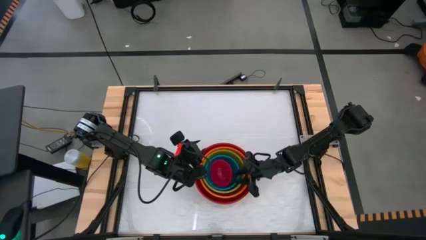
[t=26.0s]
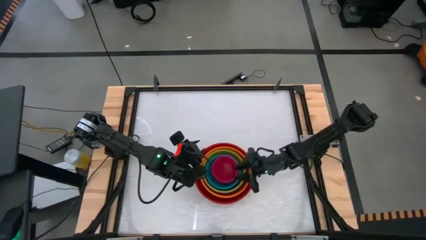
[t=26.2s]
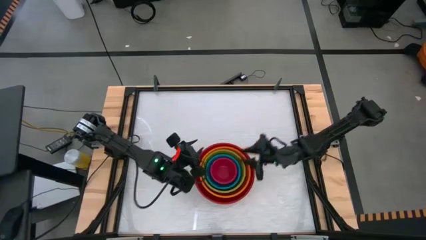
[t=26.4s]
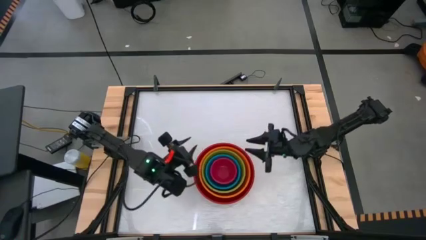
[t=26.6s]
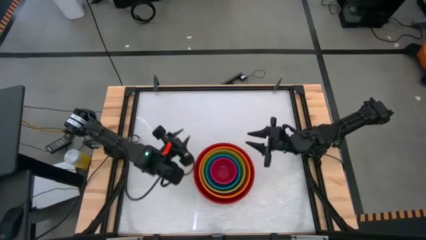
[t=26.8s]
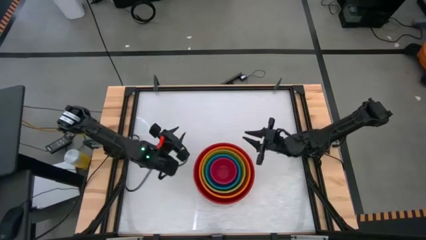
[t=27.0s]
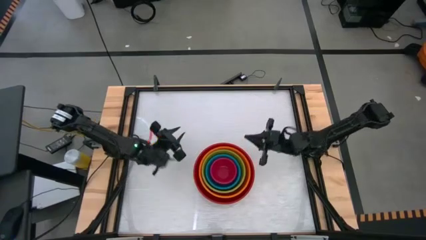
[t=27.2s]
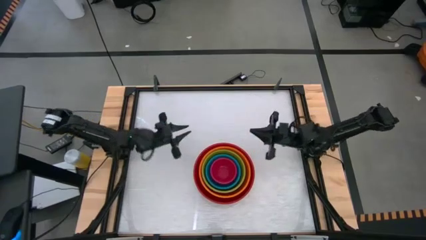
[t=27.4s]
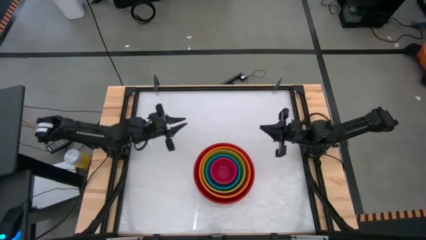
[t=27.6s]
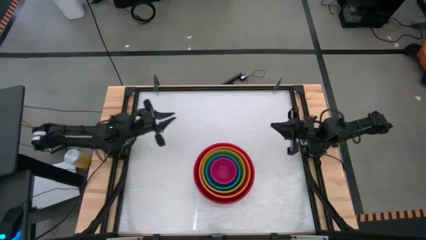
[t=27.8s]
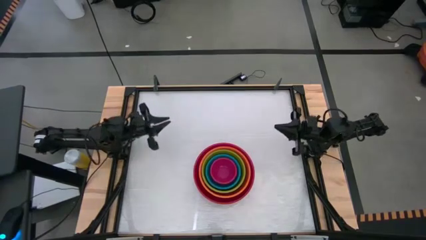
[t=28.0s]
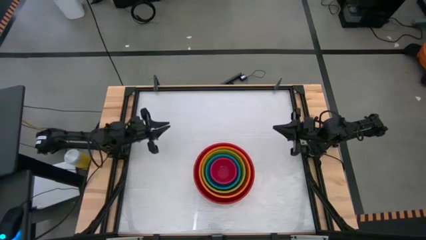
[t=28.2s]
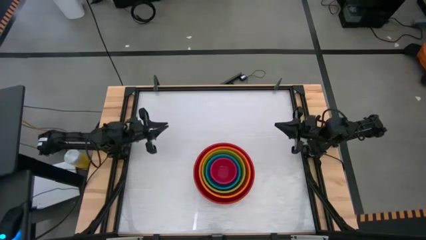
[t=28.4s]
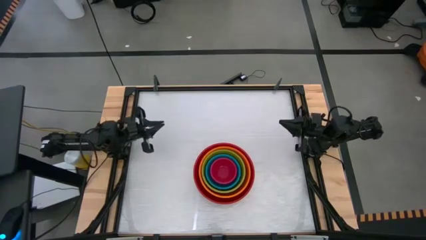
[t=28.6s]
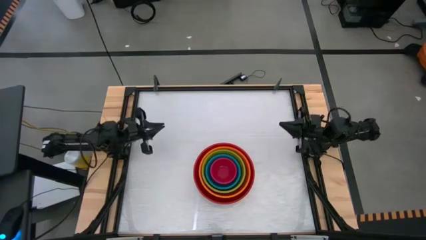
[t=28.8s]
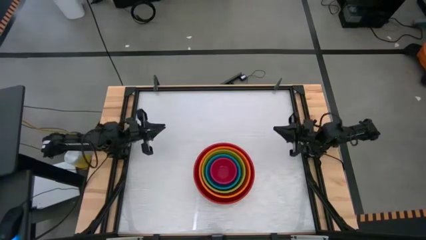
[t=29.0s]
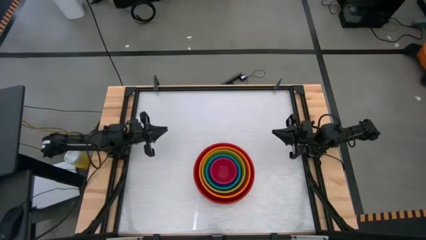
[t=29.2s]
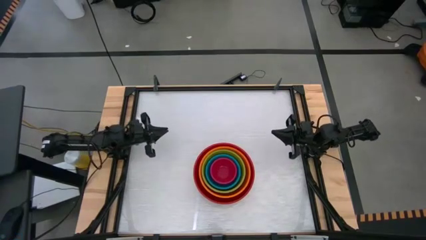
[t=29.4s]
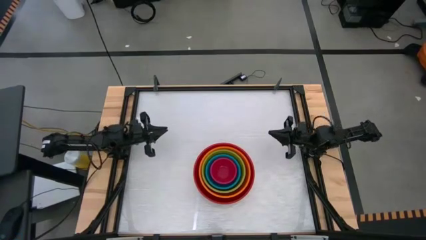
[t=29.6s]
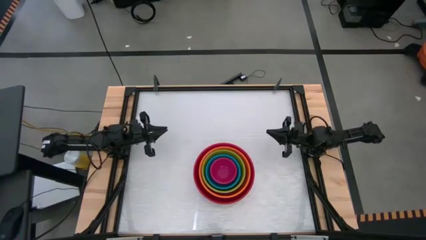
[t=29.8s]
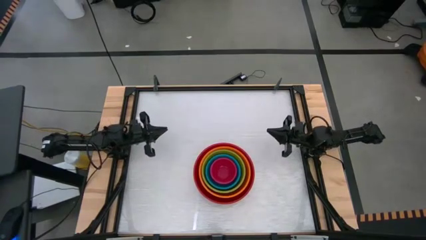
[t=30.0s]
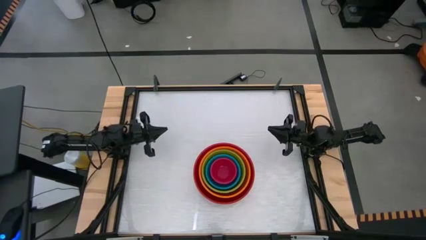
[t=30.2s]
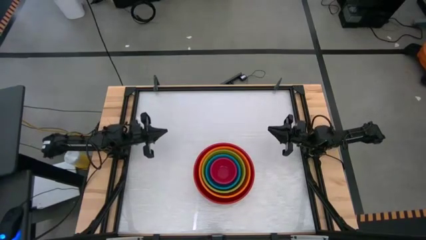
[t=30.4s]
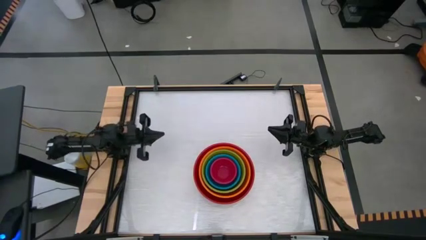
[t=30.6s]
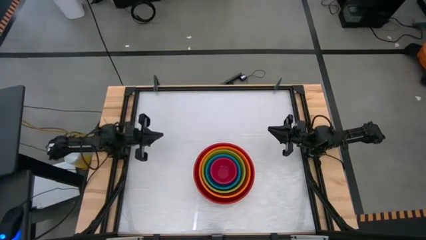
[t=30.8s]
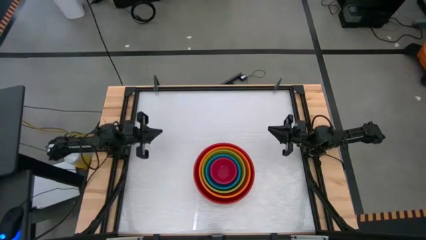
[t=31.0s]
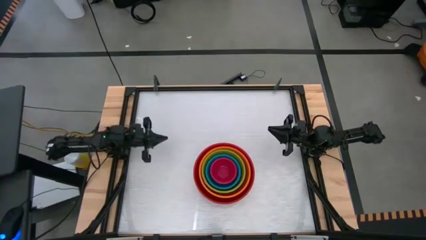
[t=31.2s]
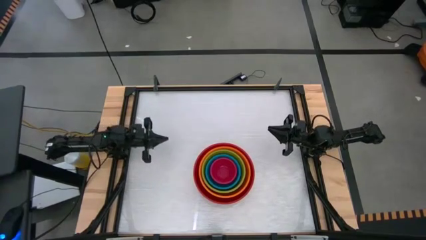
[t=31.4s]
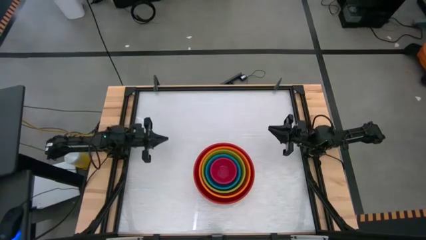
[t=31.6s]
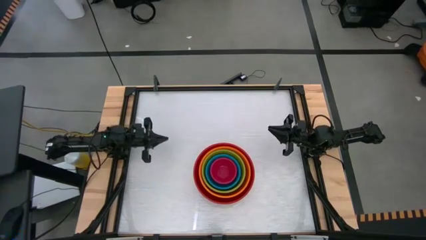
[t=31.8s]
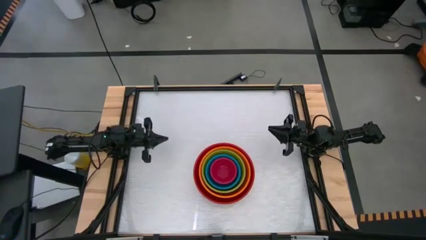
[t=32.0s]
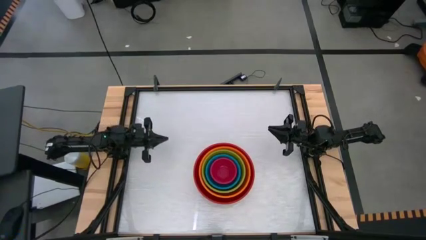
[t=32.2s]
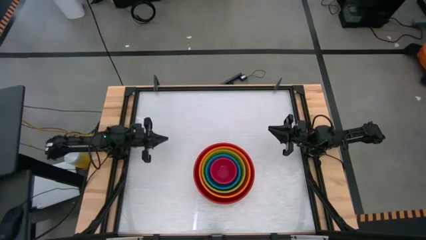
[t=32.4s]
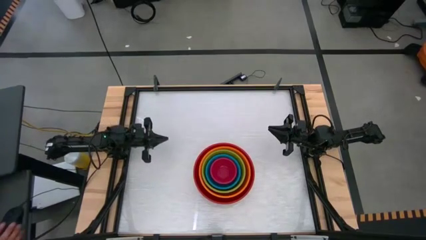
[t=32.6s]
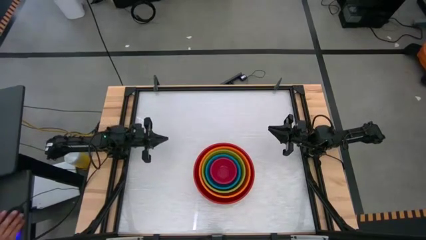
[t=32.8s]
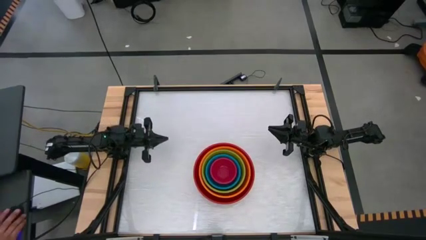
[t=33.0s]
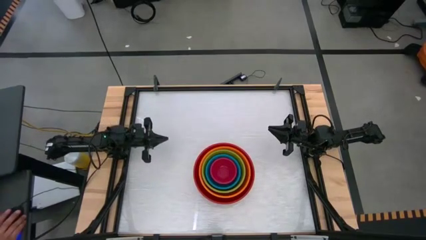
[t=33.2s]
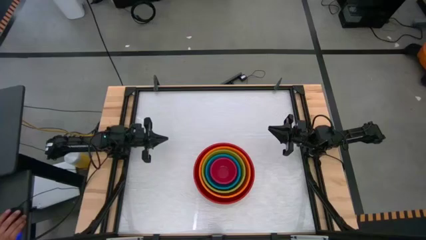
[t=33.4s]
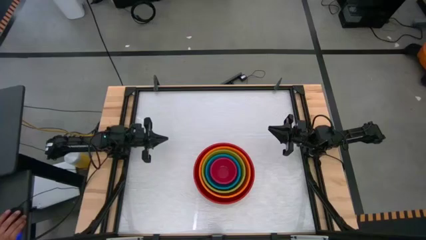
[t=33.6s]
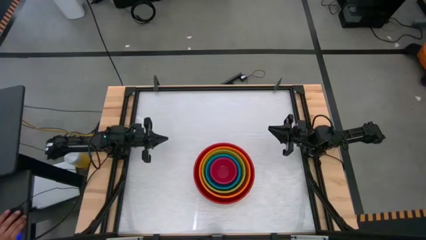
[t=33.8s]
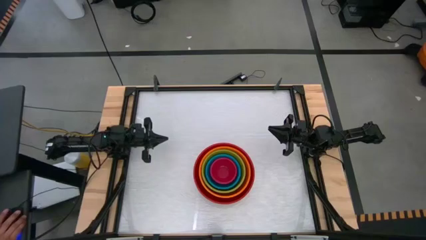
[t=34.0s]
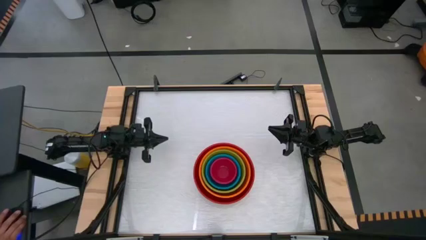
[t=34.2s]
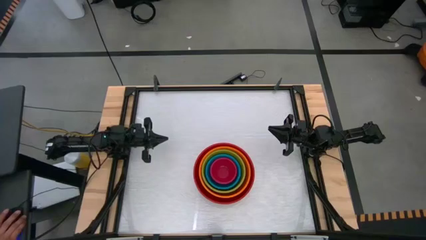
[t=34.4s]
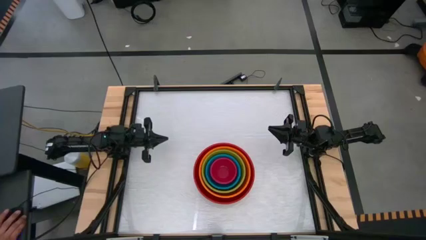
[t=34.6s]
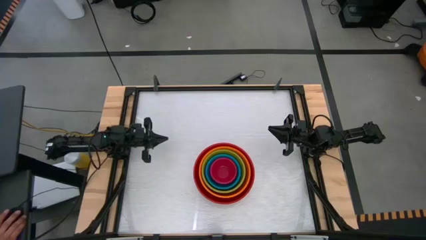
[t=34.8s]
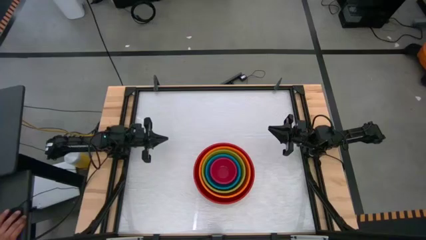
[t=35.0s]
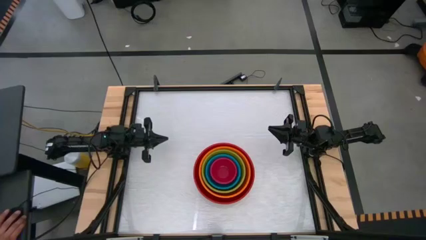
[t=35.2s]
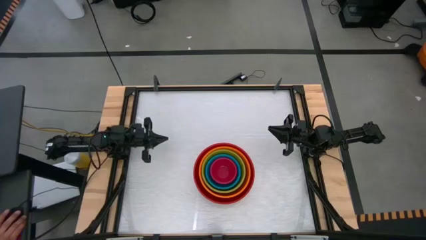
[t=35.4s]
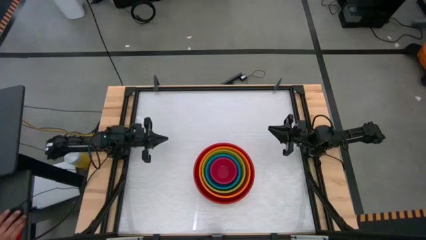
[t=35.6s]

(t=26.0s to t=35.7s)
Return to Home Position

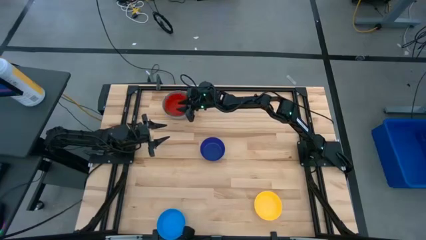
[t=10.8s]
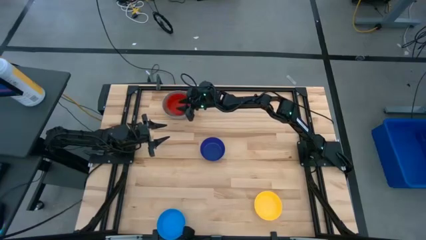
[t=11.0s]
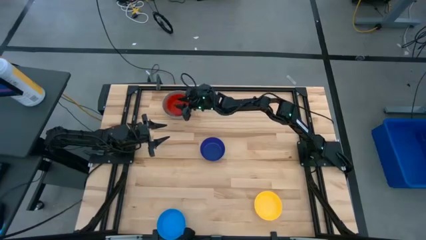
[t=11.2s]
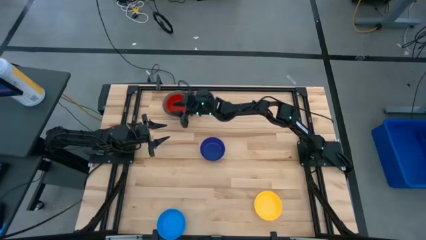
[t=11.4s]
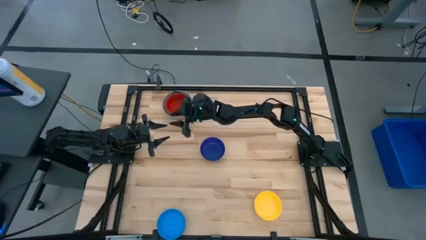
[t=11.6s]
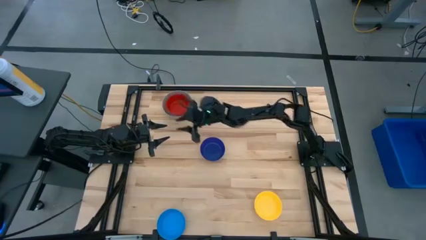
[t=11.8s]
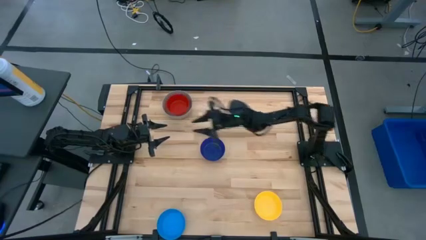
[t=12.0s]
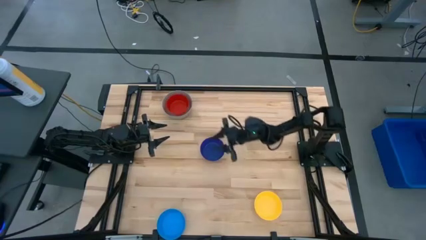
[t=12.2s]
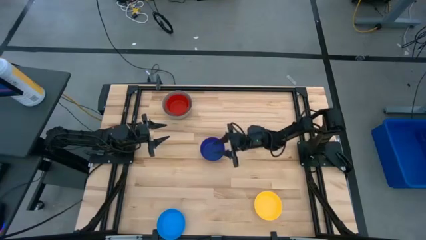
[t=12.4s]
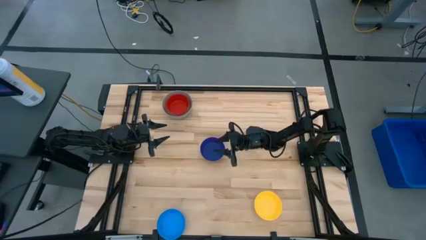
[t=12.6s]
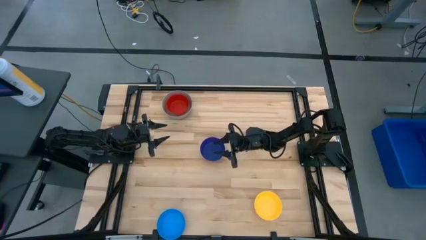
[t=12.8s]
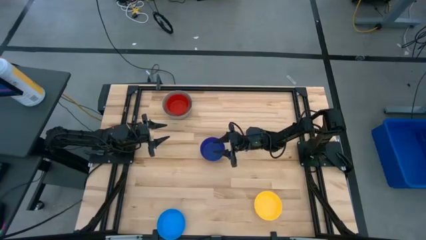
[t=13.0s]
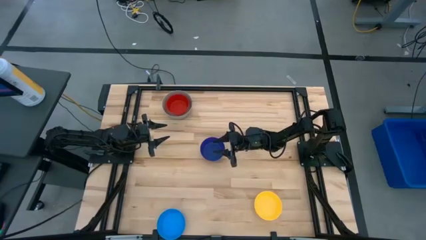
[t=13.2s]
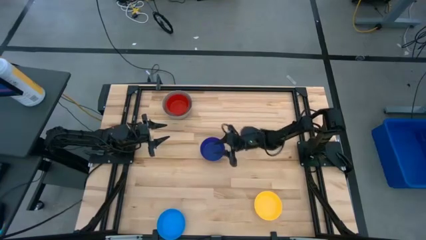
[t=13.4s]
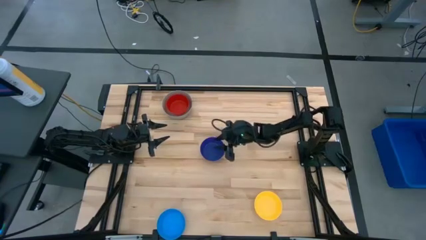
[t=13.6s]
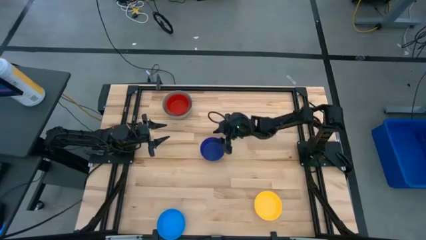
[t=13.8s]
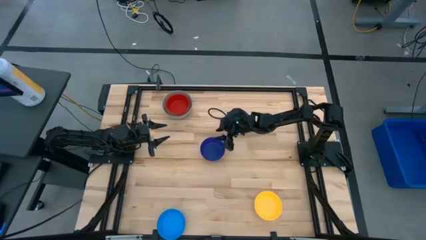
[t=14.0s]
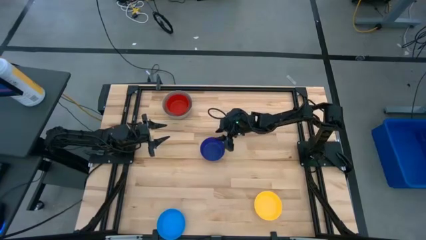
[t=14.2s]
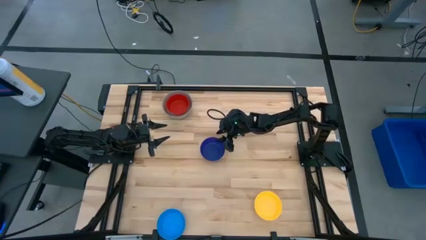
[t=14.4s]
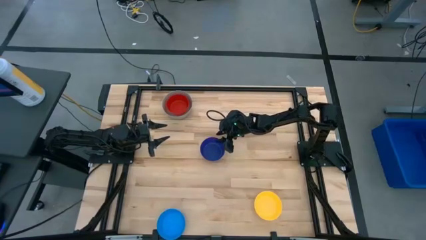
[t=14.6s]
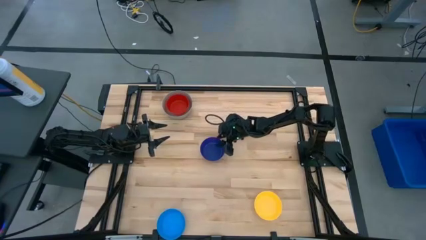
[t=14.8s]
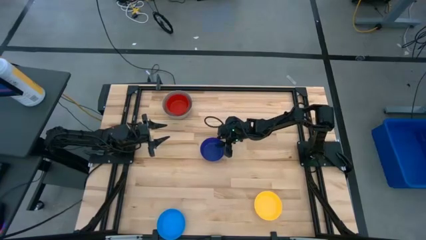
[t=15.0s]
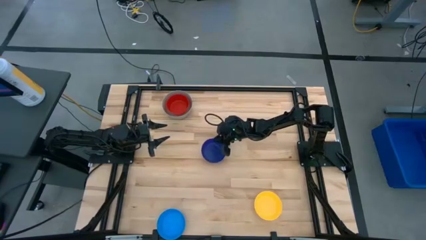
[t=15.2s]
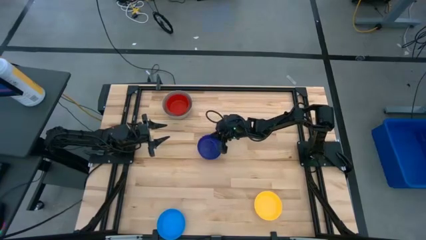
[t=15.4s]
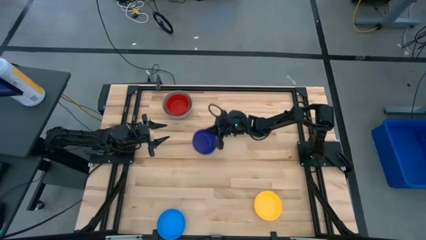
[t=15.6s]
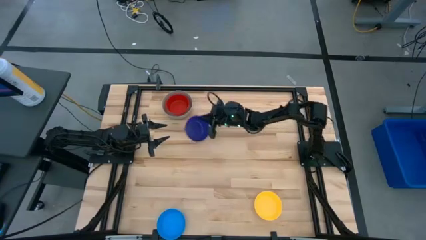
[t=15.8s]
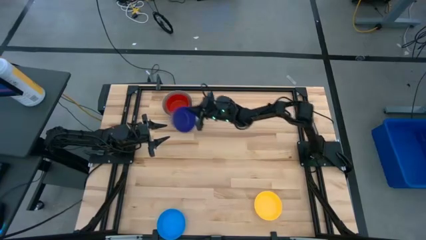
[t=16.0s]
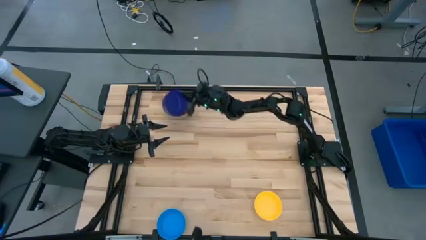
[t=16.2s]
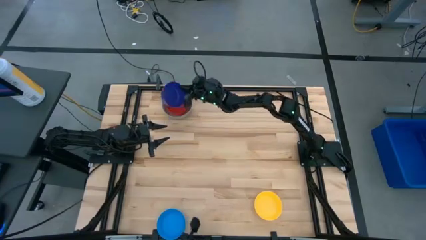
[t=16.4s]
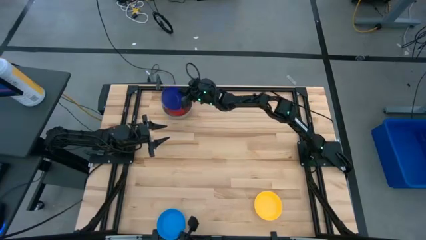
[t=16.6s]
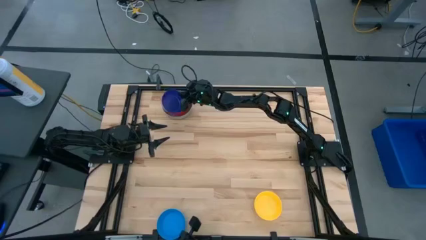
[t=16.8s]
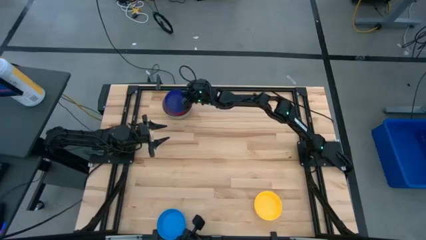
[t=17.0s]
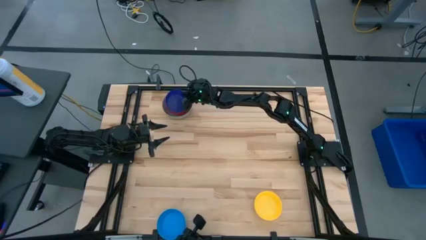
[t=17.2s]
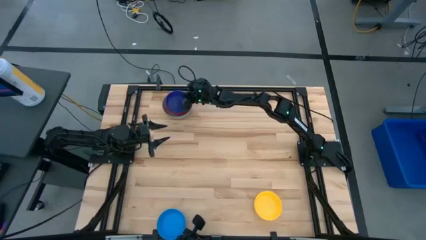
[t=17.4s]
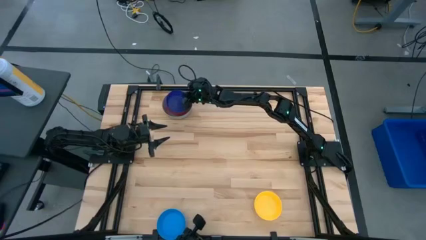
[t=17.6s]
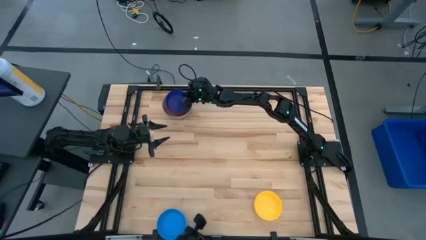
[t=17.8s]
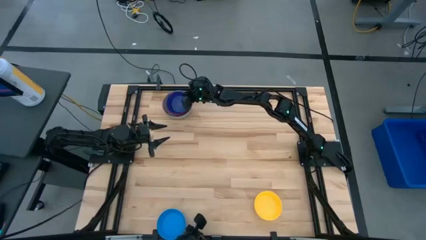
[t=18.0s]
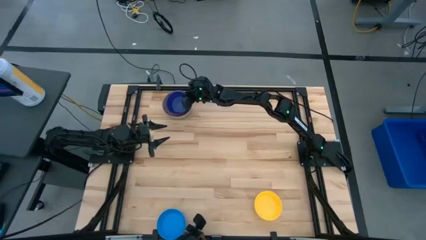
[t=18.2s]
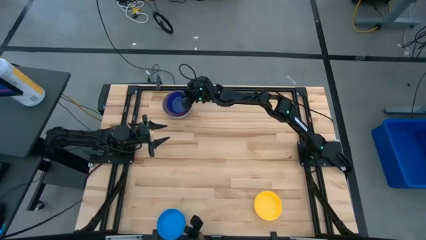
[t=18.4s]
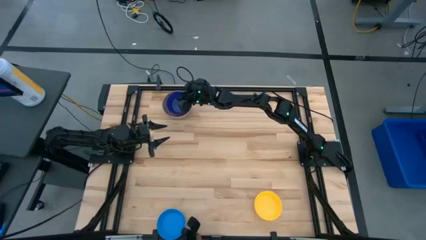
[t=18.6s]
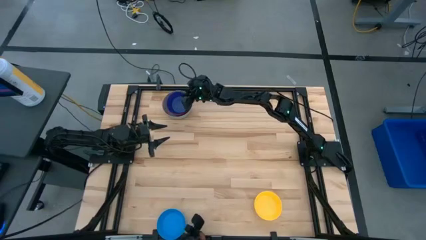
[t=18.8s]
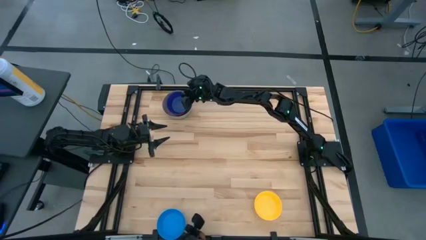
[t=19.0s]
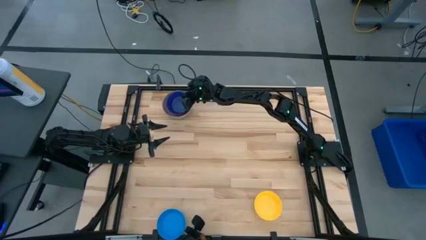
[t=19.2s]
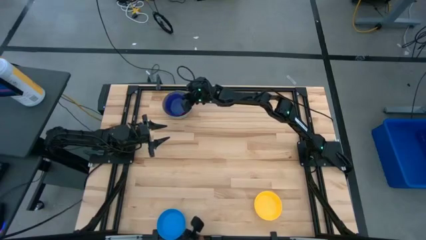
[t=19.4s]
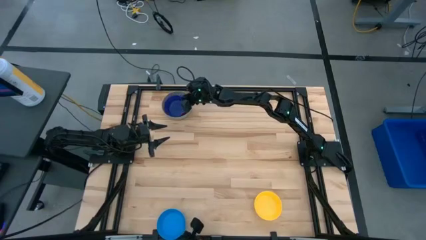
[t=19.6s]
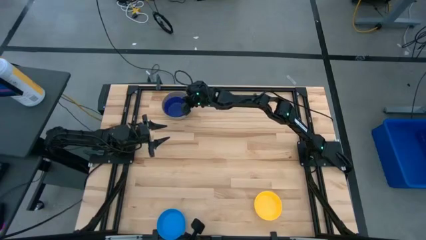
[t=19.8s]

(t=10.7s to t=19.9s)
Stack the blue bowl into the red bowl
